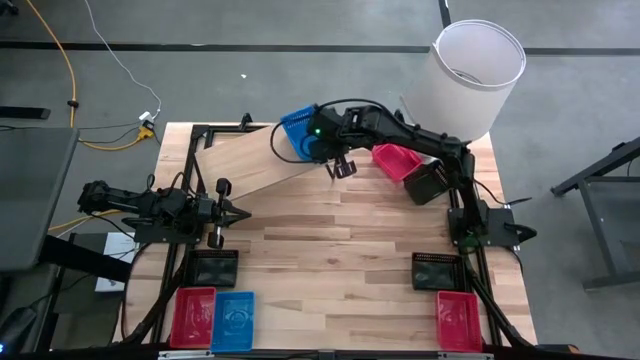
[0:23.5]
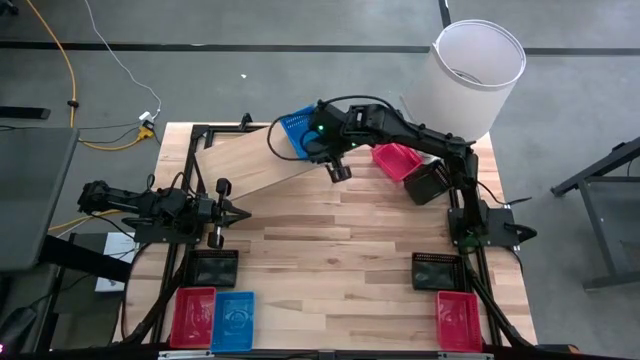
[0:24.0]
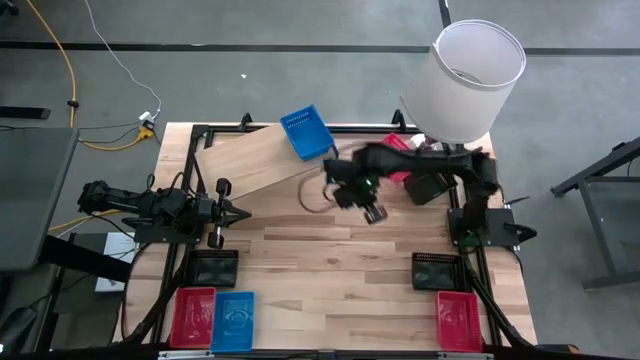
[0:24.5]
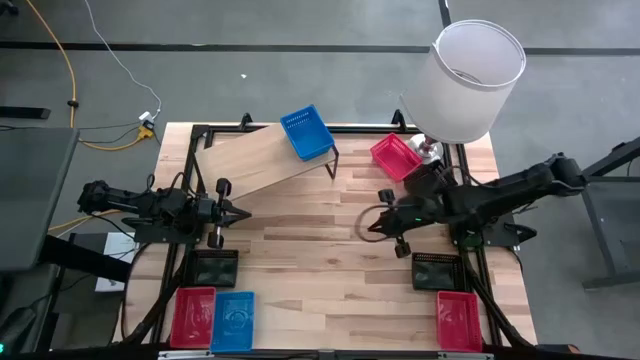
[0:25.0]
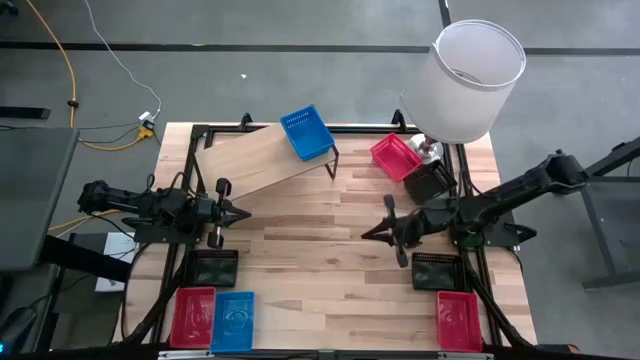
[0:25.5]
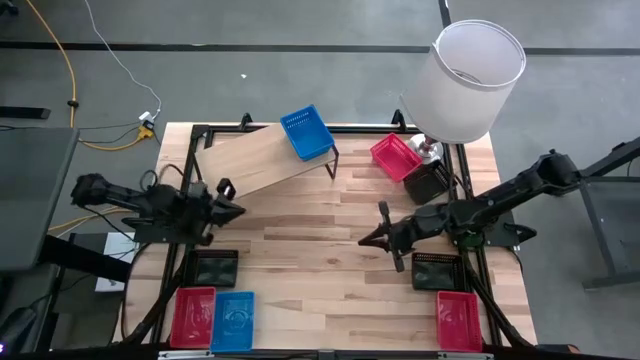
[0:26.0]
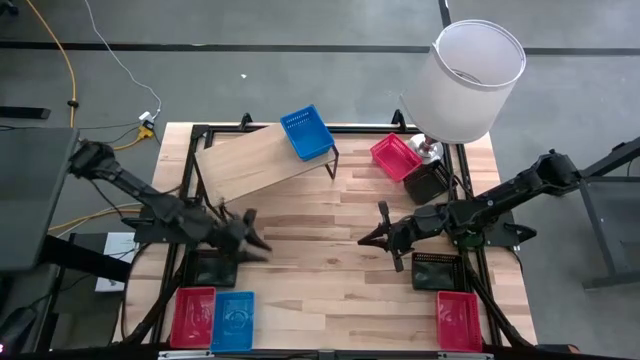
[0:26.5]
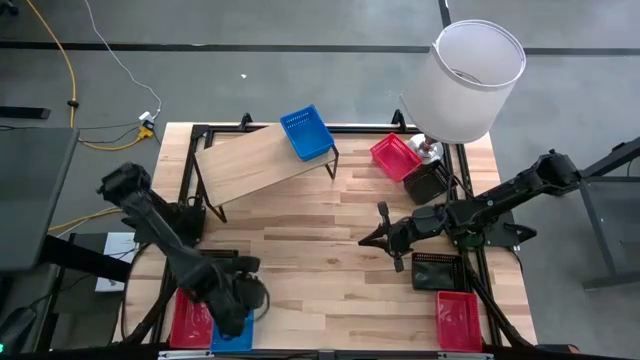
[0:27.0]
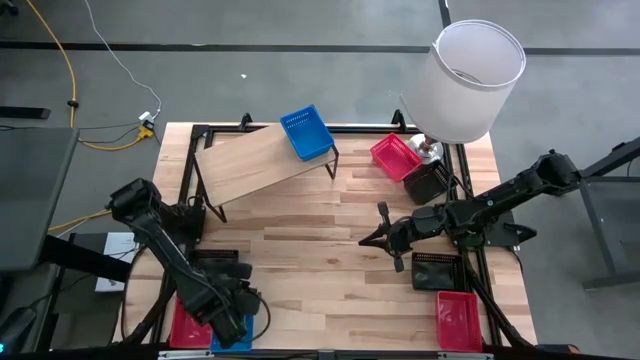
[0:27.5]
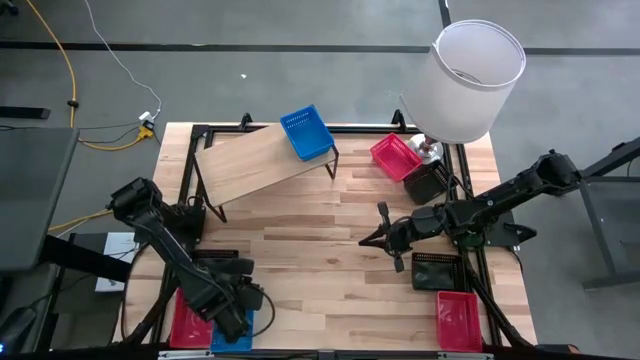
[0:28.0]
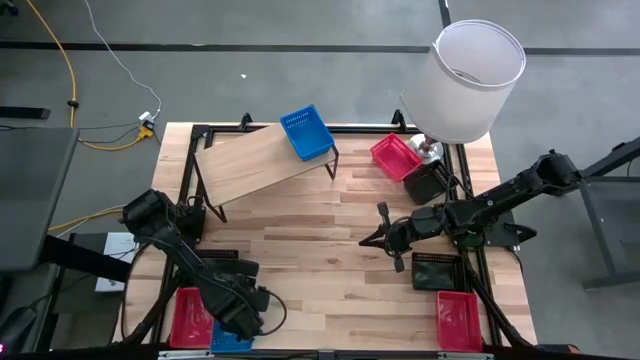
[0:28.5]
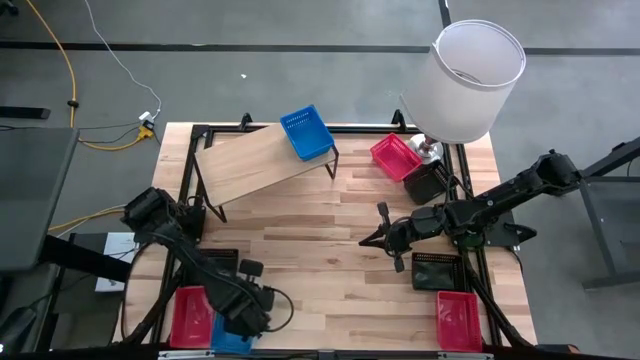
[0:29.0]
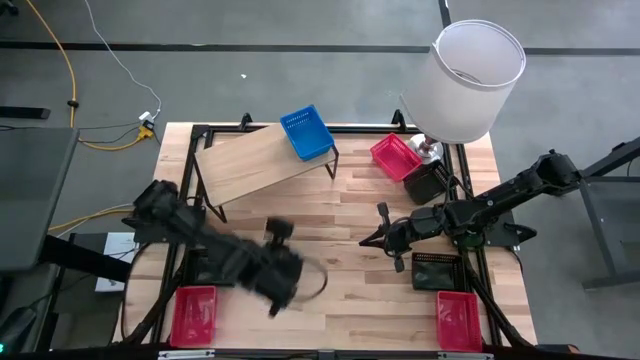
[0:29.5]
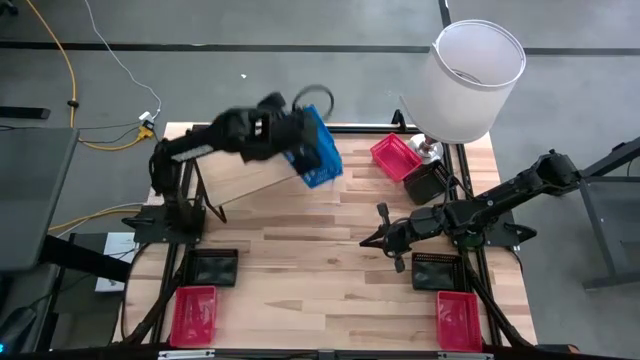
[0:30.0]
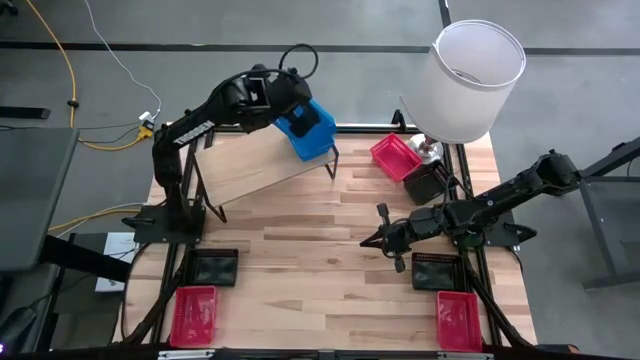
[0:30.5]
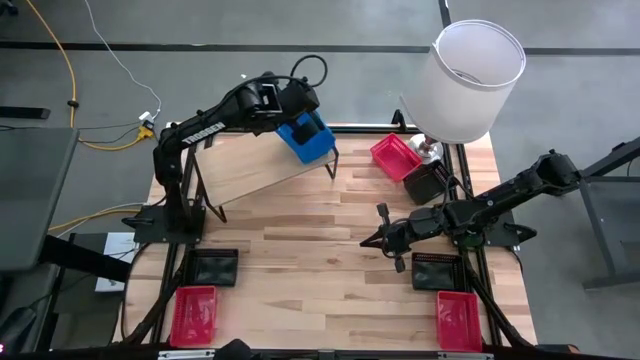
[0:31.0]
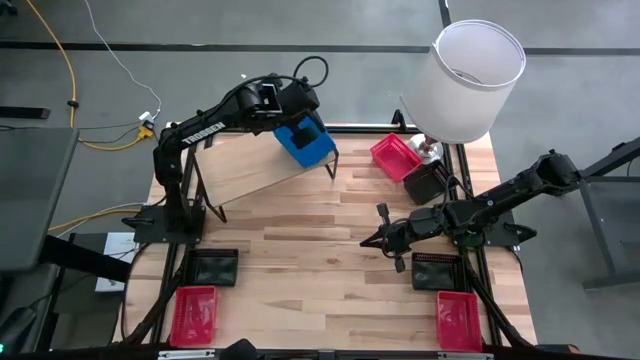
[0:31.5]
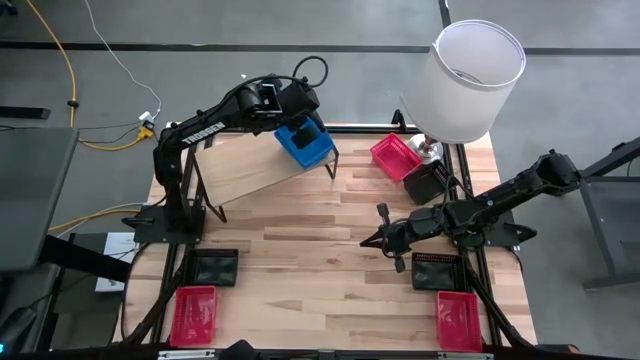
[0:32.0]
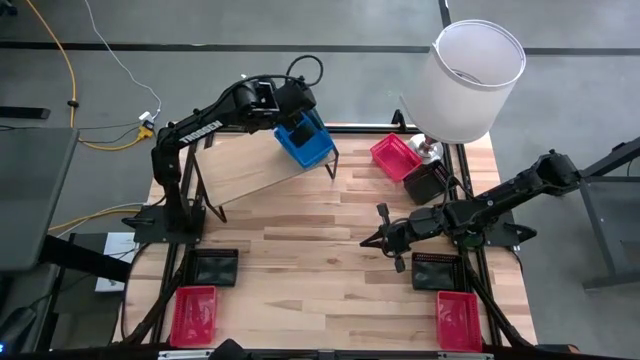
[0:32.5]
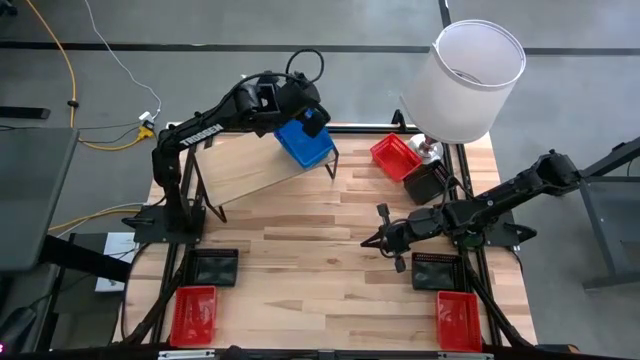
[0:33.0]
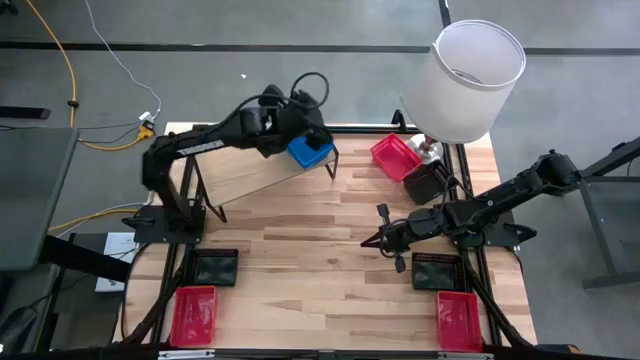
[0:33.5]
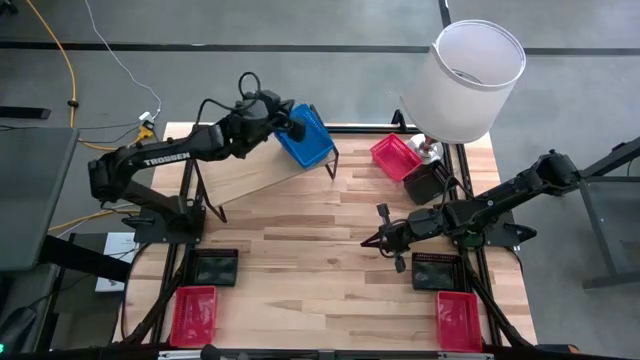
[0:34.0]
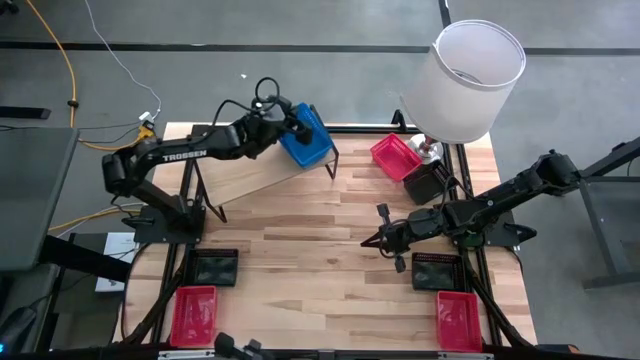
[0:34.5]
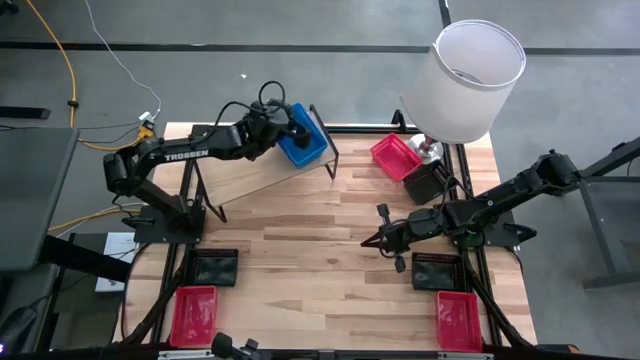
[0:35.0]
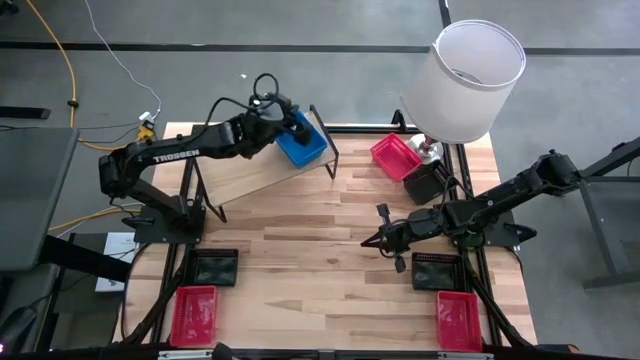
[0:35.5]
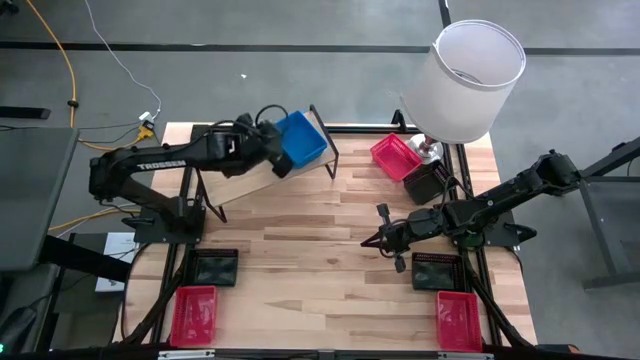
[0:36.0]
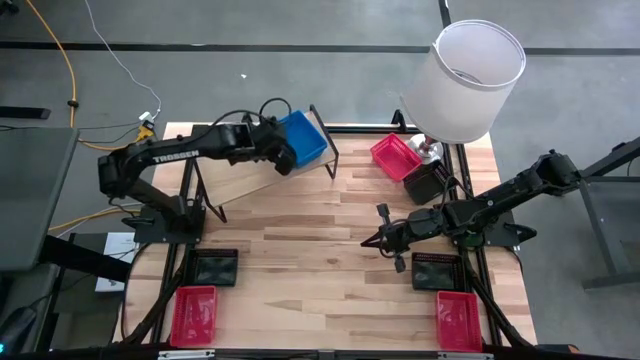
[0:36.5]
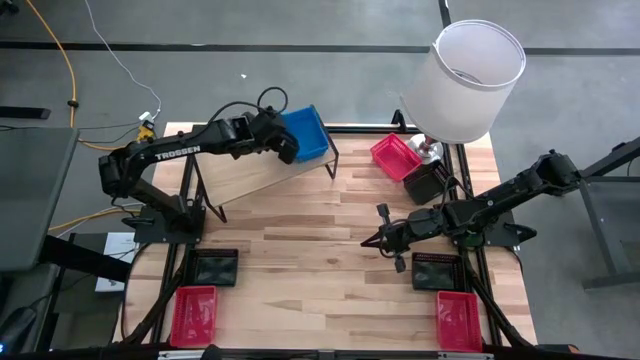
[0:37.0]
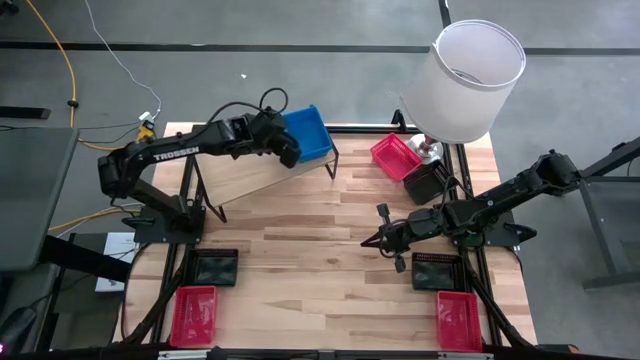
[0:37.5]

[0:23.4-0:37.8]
Task: Stack baskets on shelf by color
Stack the blue bin on top of the other blue bin on the shelf

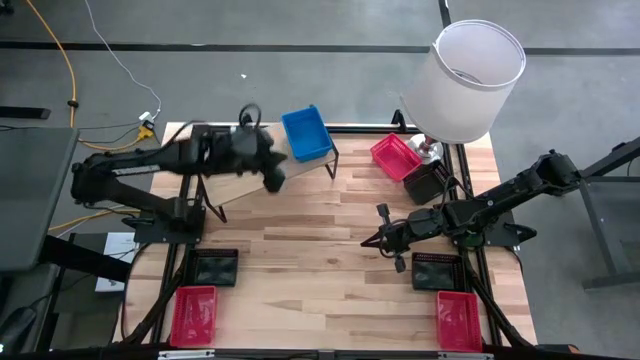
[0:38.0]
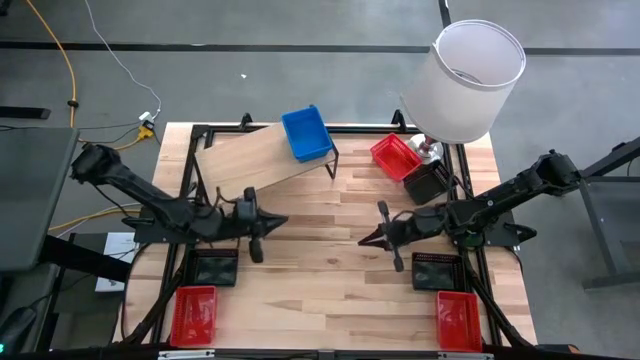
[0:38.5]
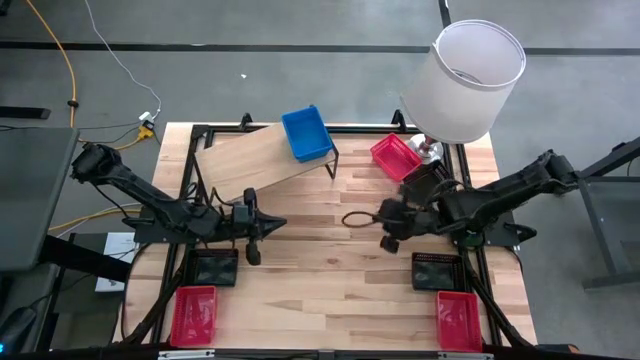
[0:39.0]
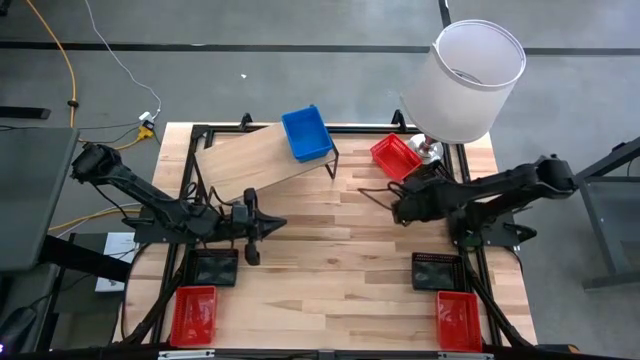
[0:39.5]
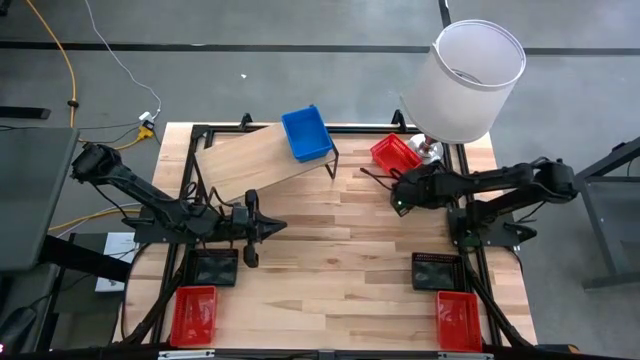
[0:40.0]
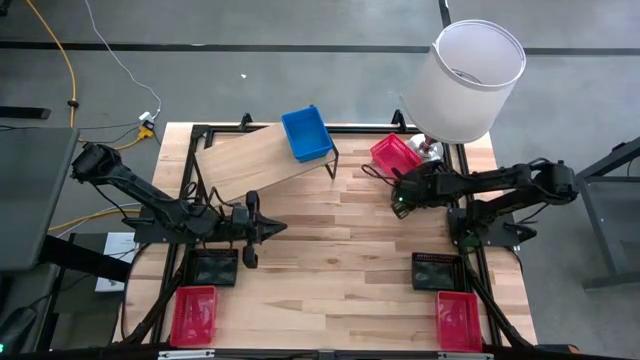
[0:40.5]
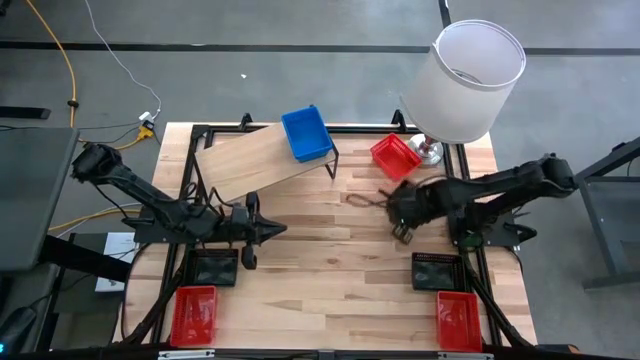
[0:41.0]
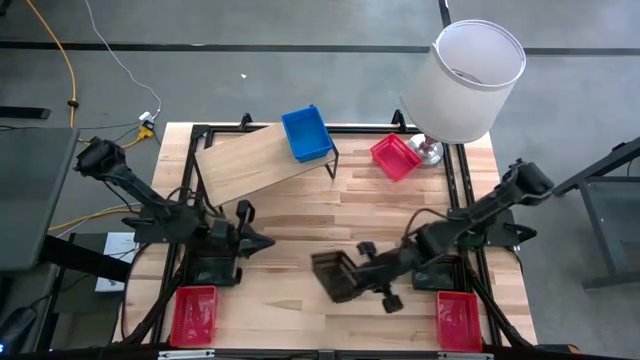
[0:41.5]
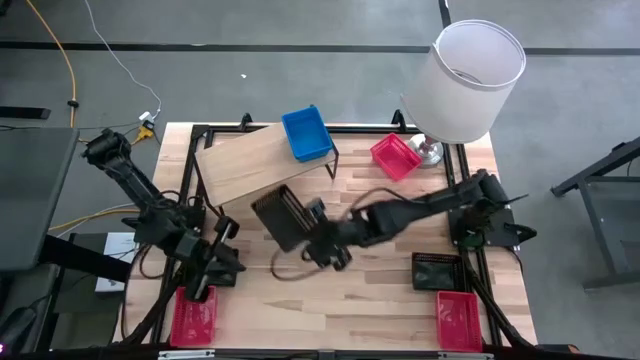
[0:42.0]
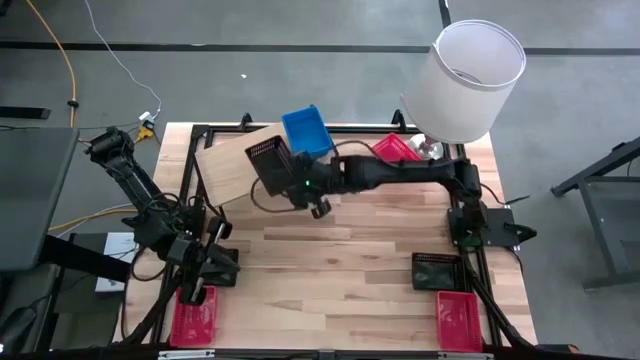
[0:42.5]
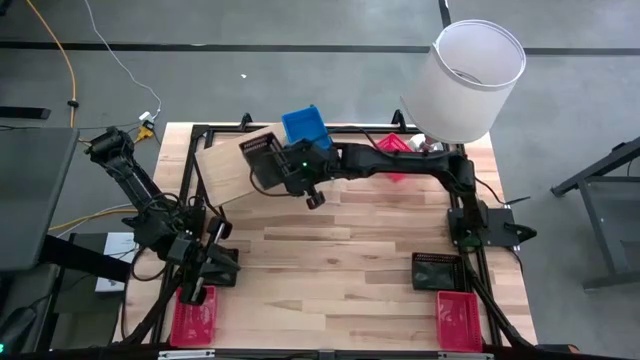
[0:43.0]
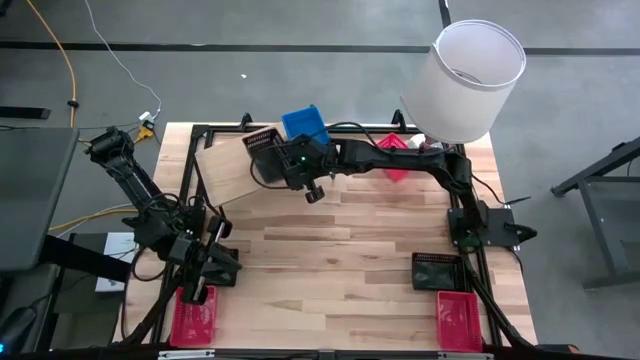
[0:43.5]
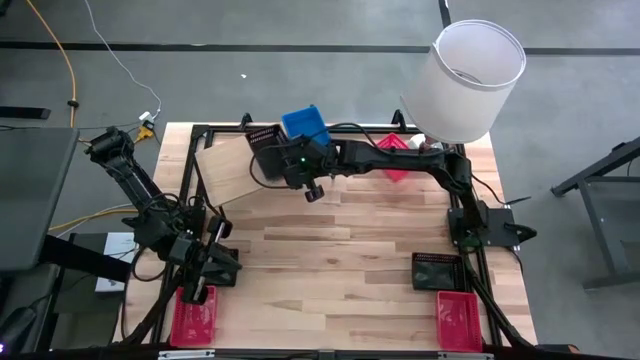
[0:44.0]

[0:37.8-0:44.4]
Put the top right black bin on the shelf

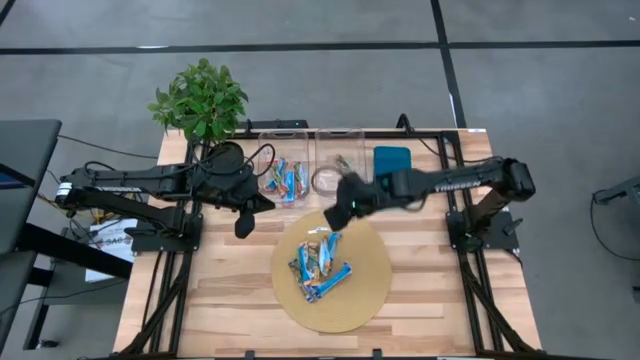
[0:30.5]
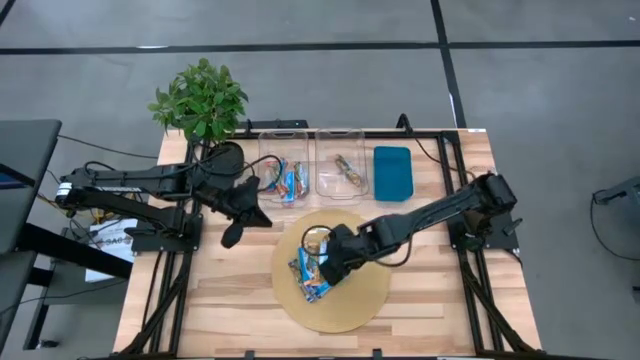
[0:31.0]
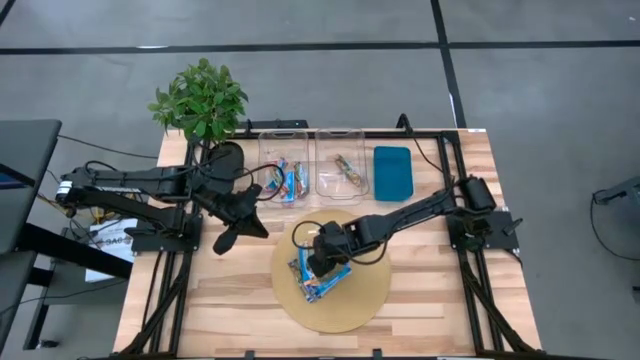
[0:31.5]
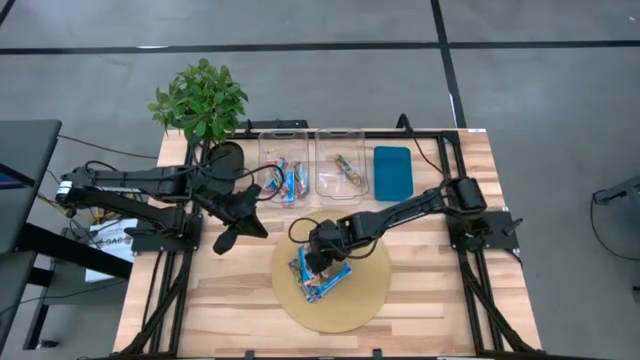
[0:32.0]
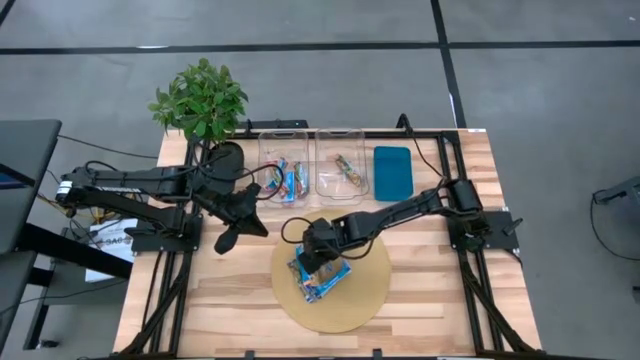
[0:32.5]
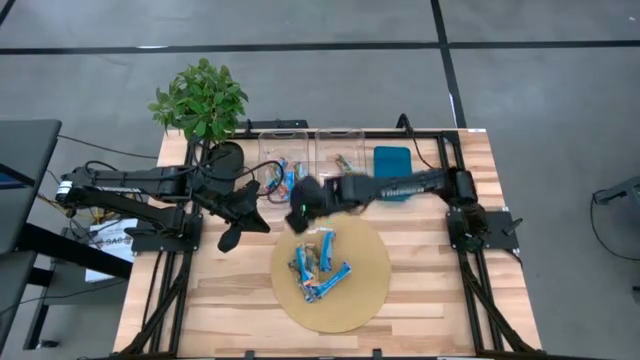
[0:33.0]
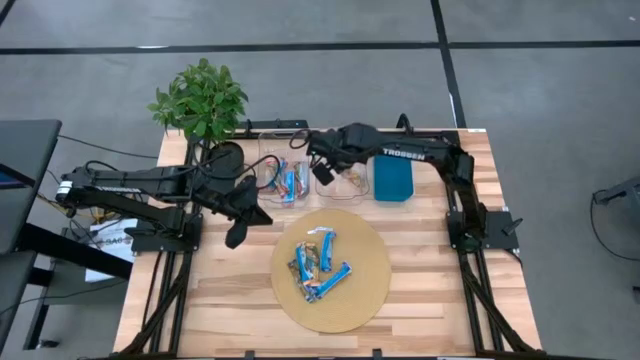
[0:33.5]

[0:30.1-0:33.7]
Task: Pick and place Granola Bars by type
Put the right yellow granola bar into the right transparent bin
